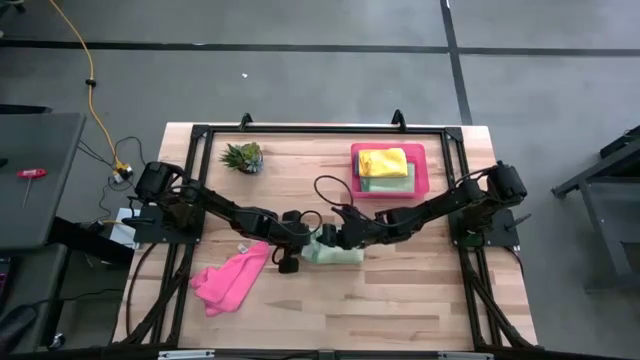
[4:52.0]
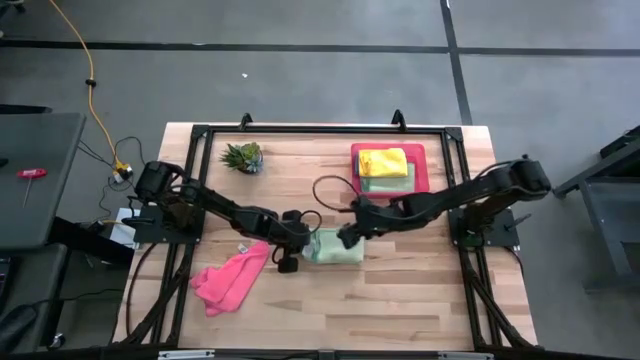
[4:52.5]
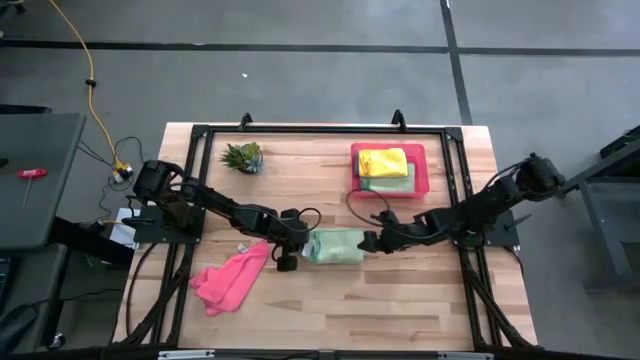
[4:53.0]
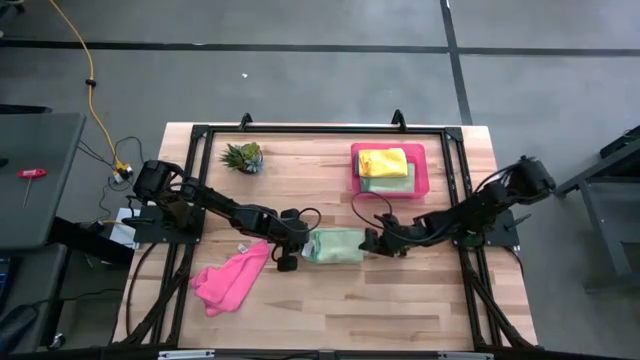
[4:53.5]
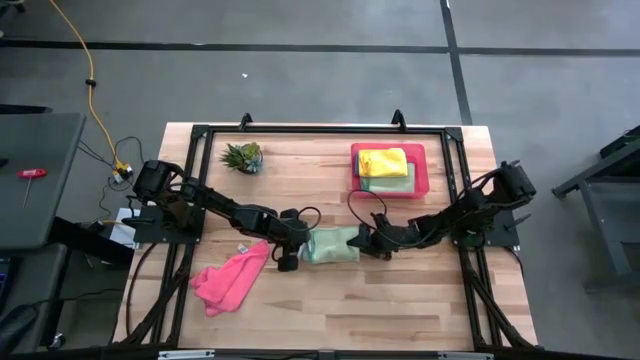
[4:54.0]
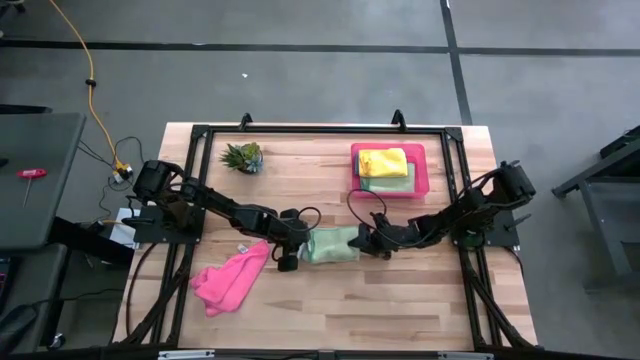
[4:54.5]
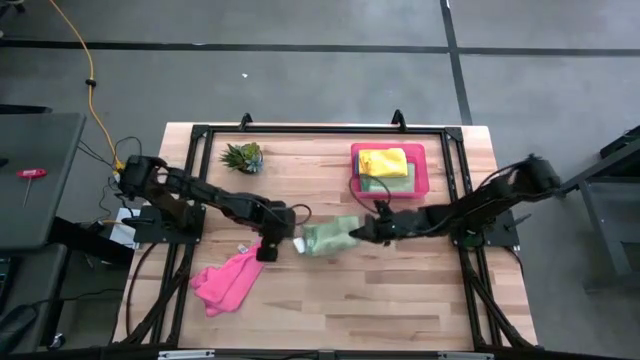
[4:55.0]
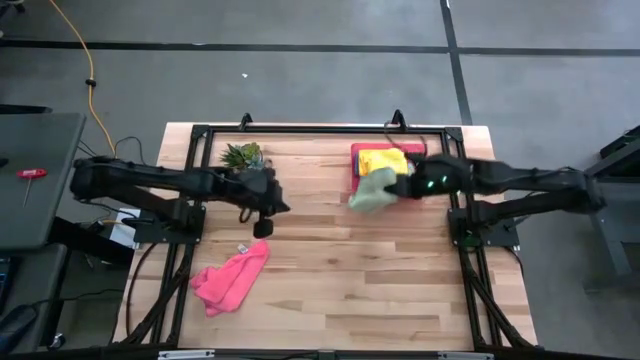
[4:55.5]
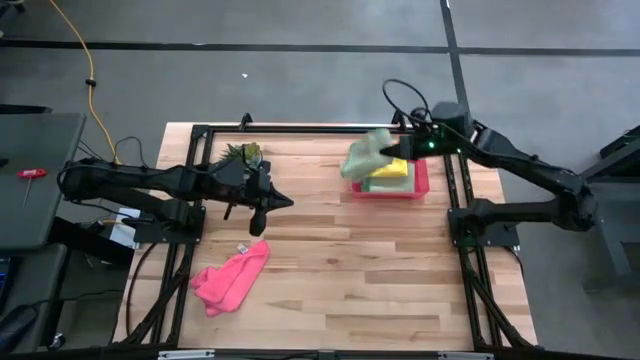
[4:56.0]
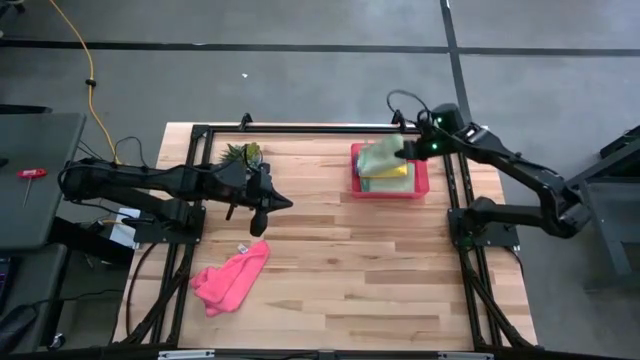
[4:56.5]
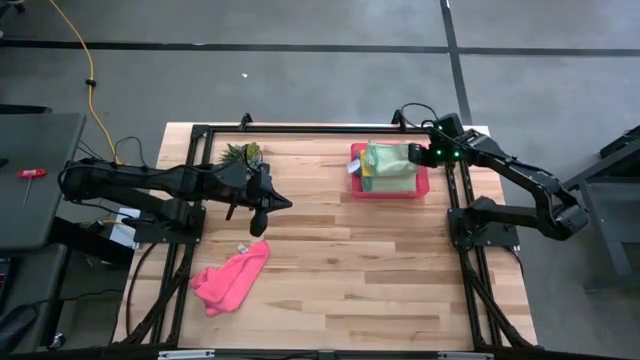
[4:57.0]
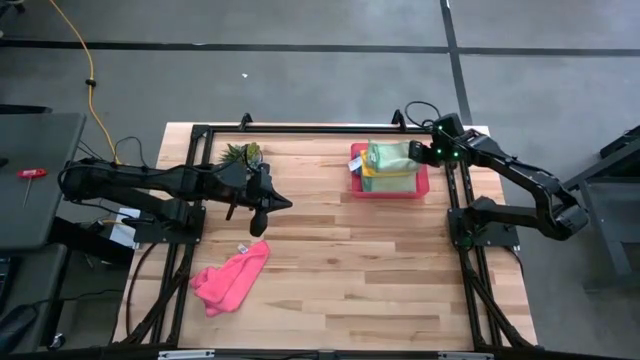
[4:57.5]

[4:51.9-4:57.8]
Task: Fold microfiber towels
Stack the folded green microfiber cloth on top of the yellow microfiber cloth in the pink bin

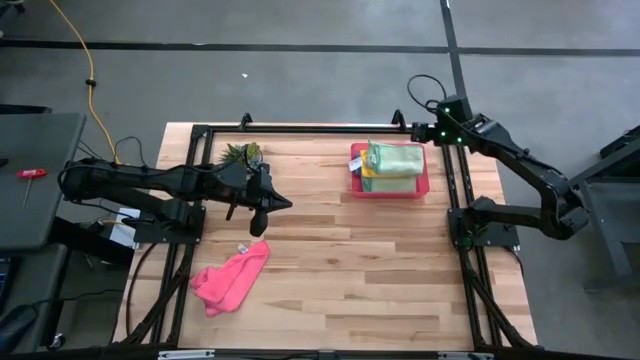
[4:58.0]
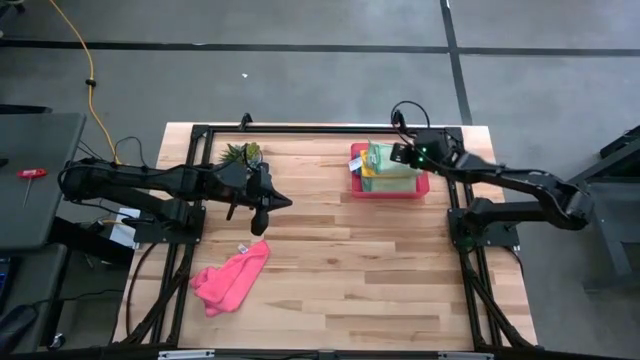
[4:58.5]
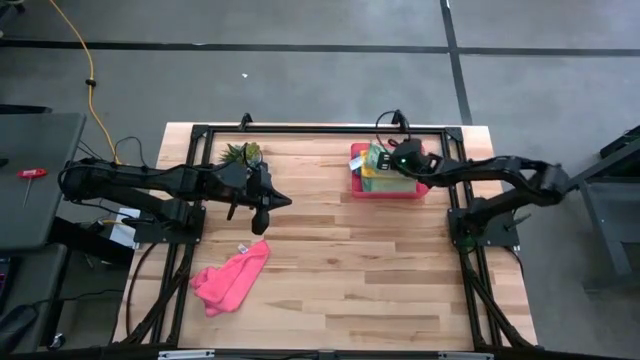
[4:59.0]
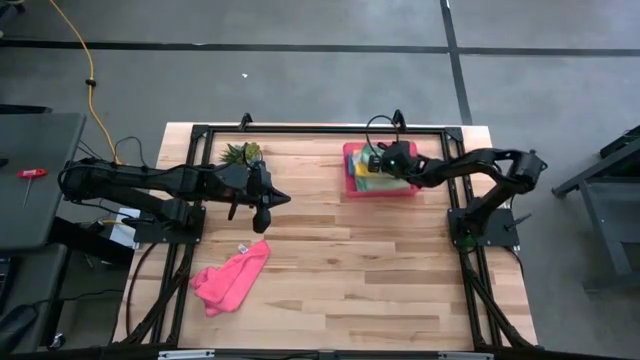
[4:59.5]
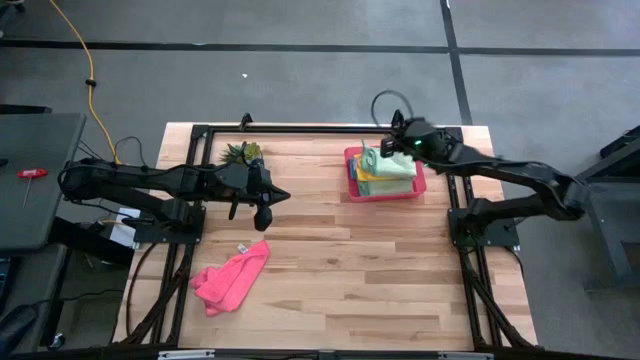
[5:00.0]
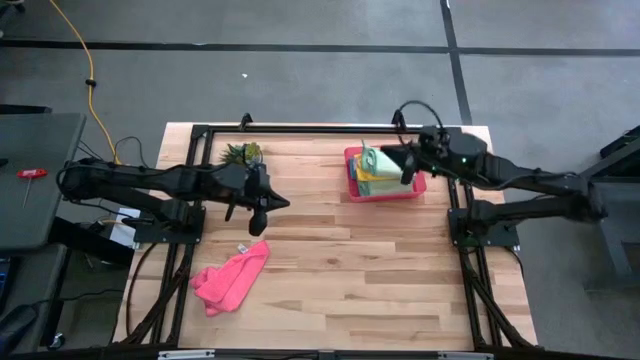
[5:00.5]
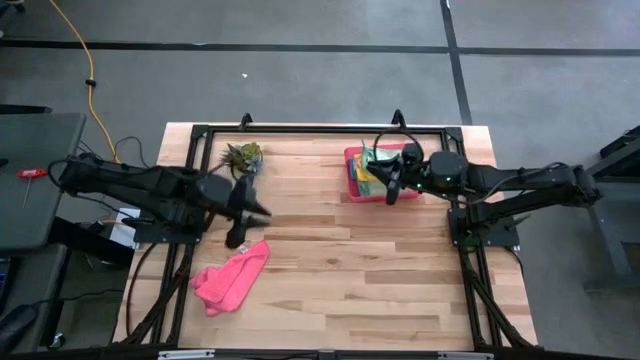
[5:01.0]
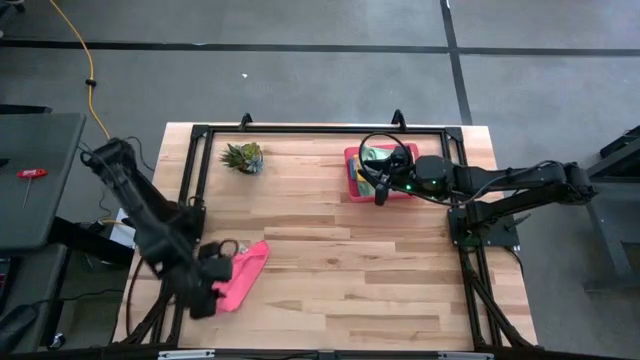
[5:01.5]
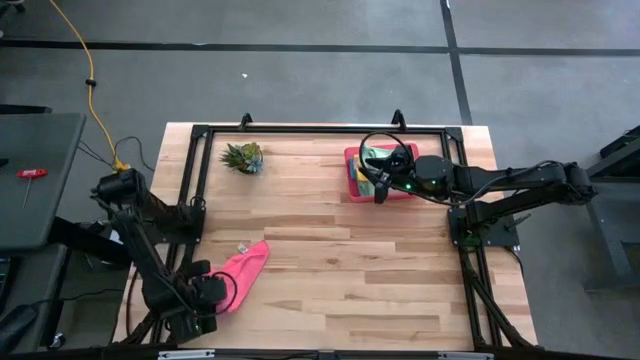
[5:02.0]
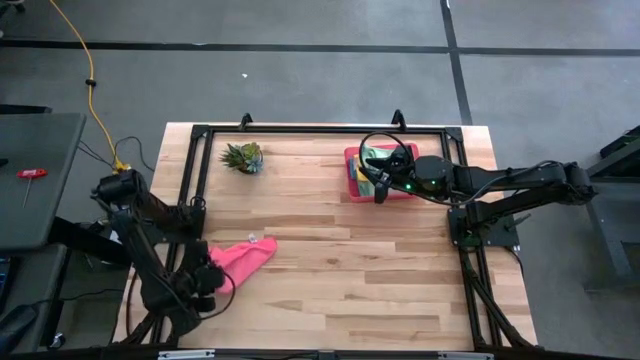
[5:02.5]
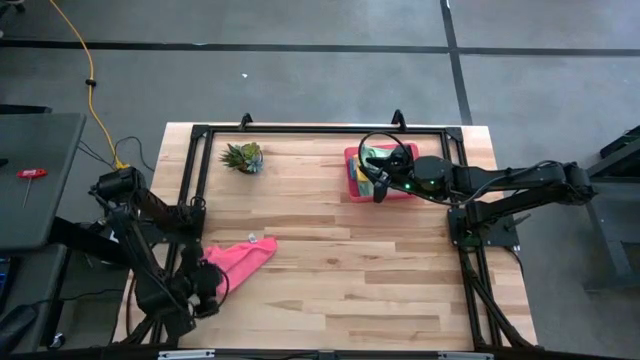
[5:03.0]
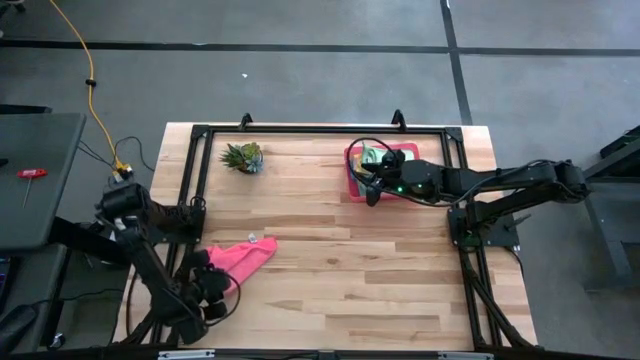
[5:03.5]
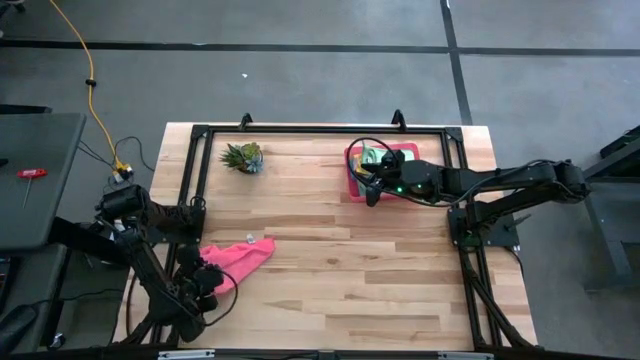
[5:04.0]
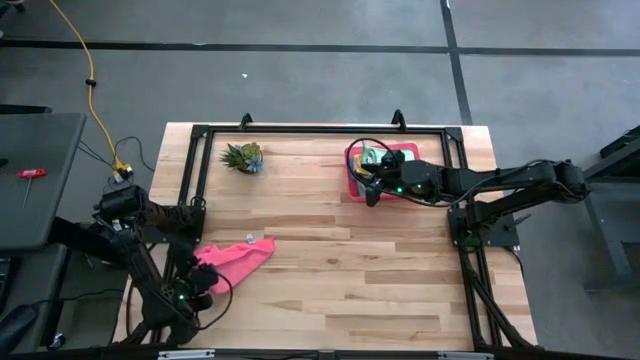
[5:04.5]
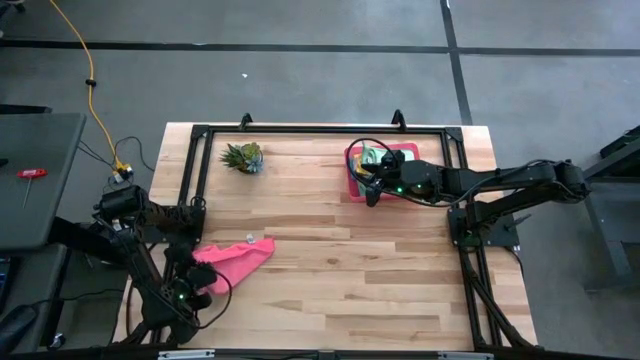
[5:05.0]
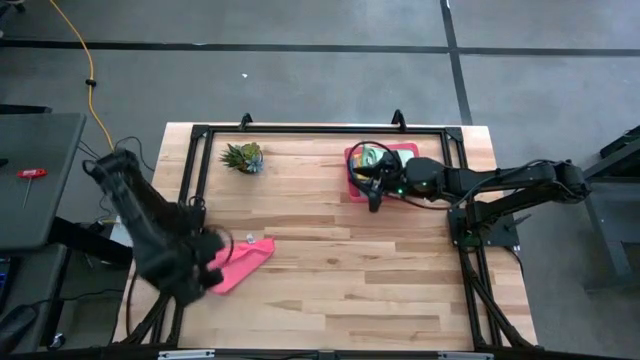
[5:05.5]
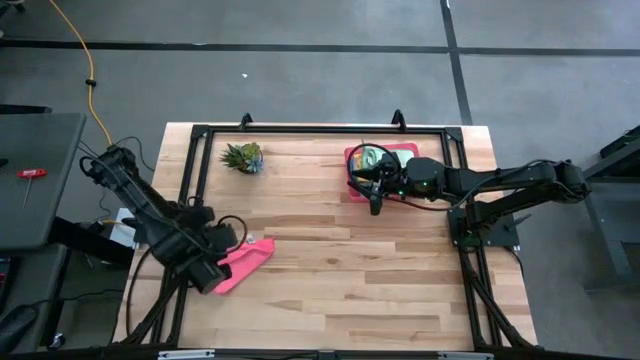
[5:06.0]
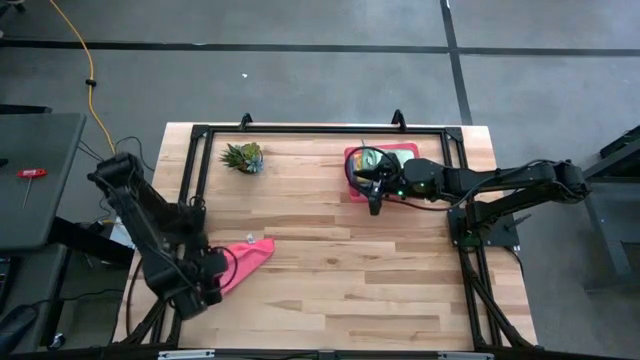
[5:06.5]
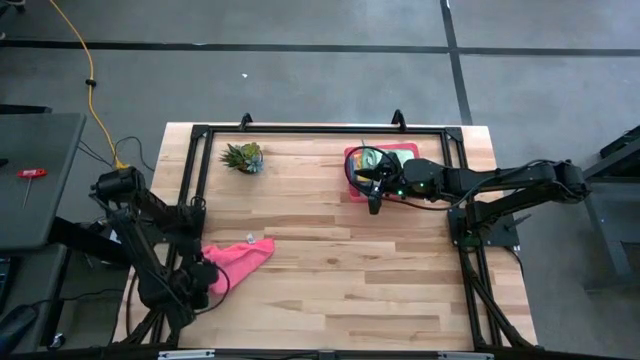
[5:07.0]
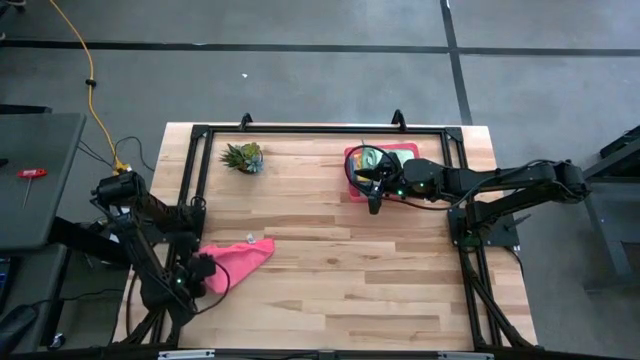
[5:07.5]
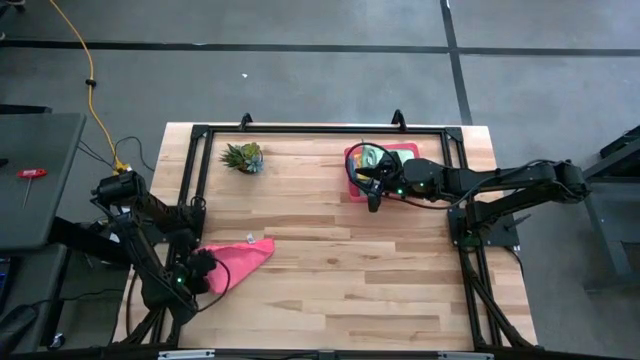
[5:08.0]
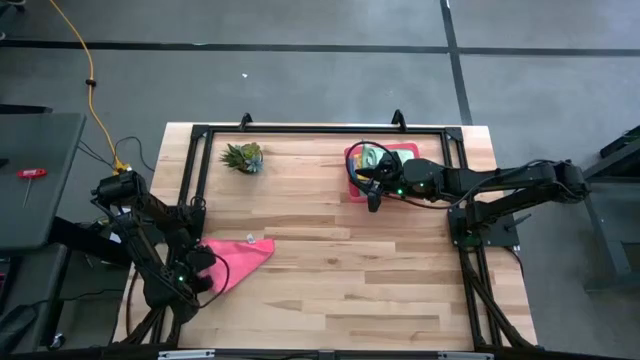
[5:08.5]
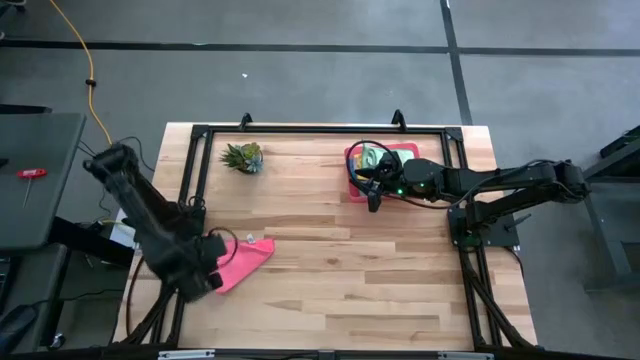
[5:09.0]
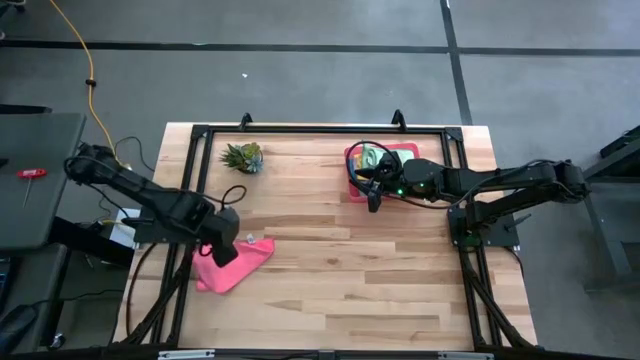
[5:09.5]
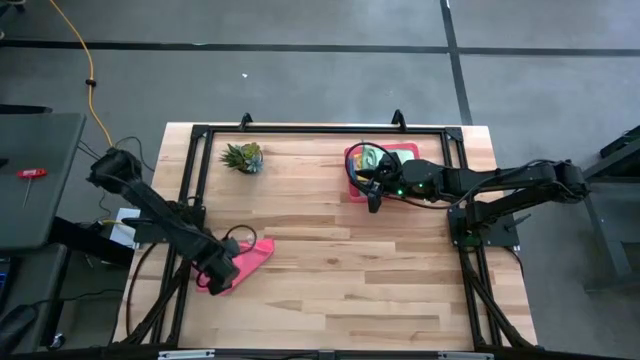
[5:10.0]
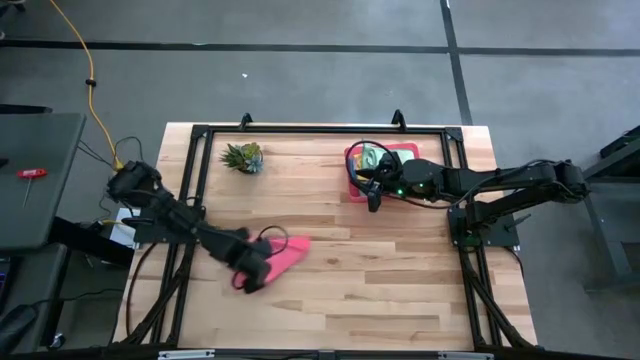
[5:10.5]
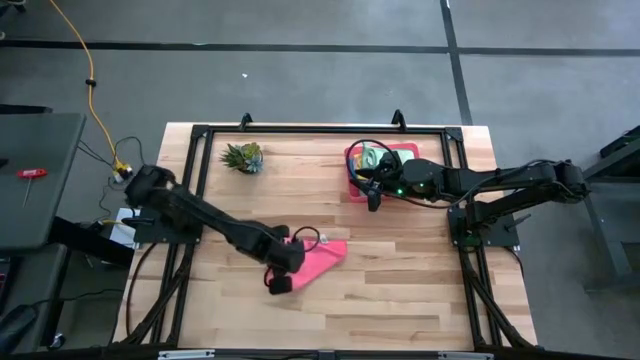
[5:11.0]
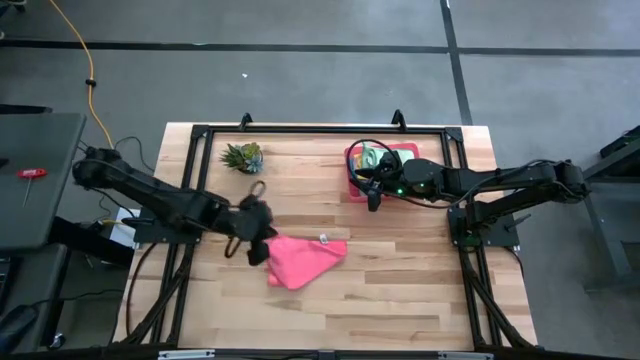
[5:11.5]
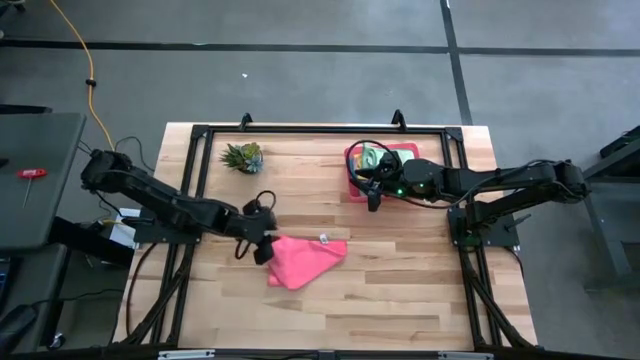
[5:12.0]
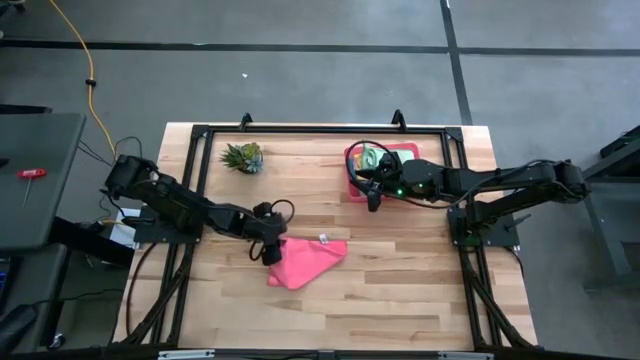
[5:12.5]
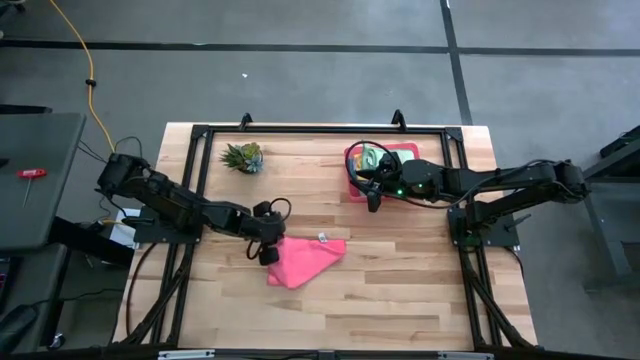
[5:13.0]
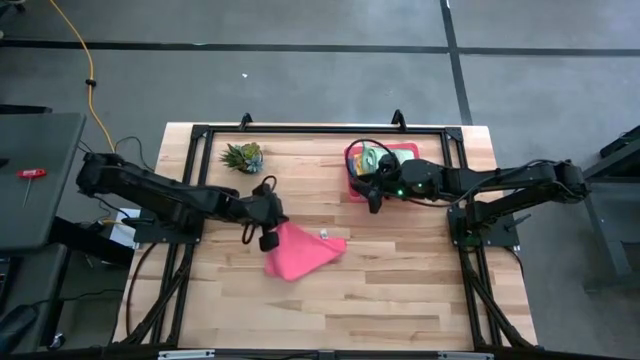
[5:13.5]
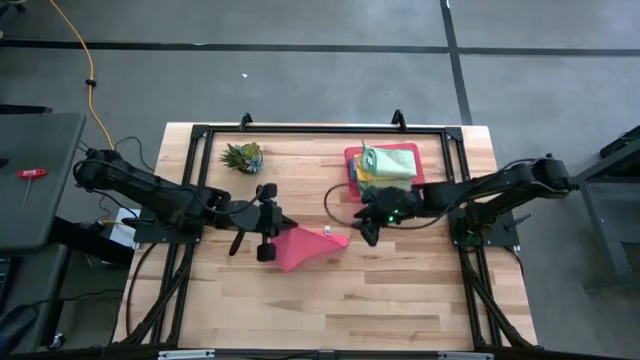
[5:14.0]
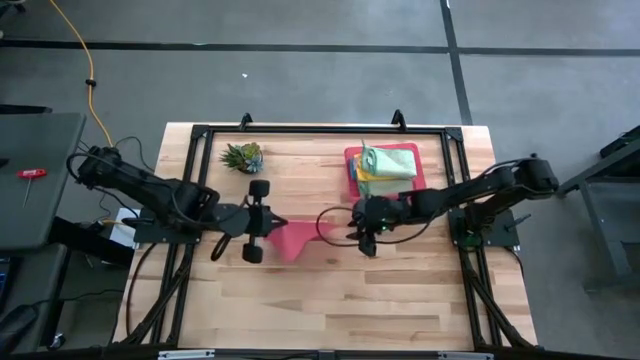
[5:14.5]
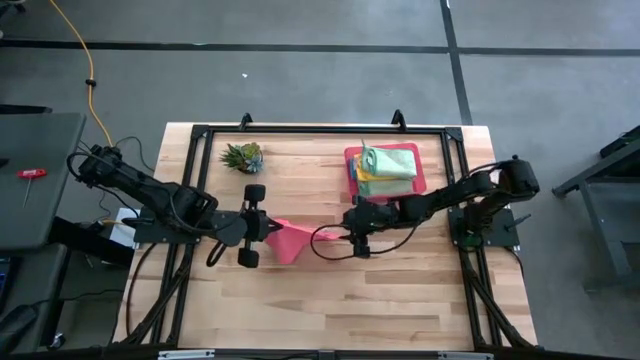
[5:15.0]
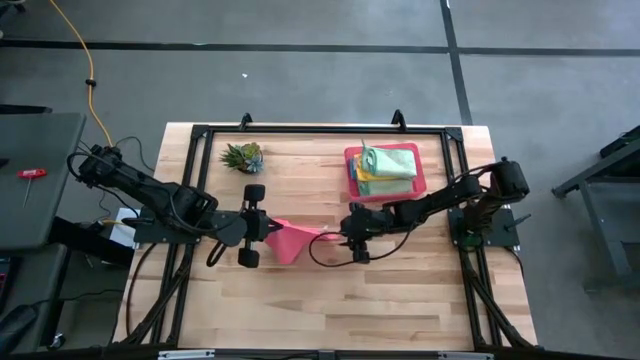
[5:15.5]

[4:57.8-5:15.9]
Fold the pink microfiber cloth
